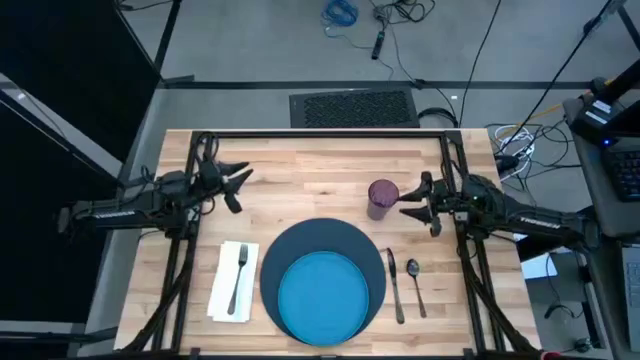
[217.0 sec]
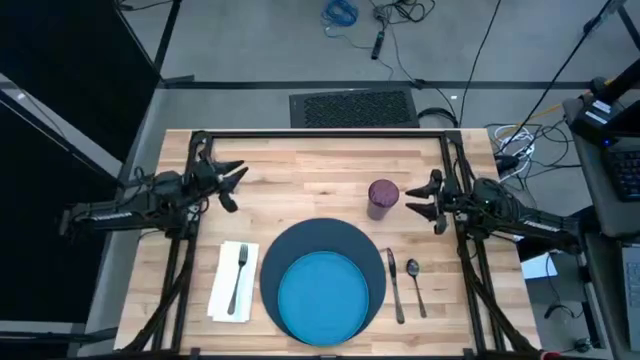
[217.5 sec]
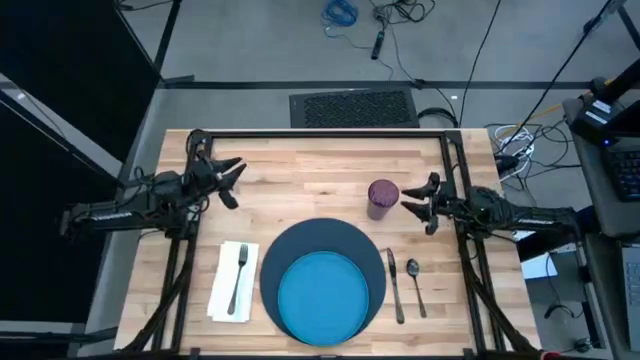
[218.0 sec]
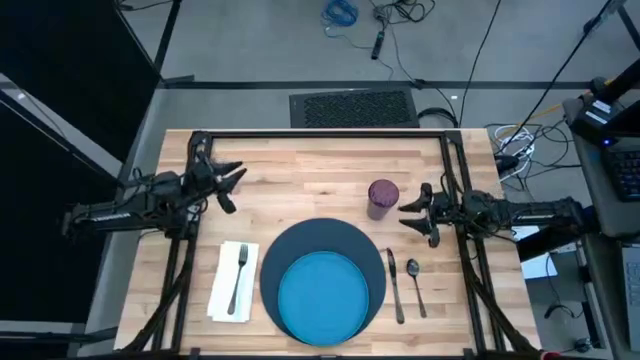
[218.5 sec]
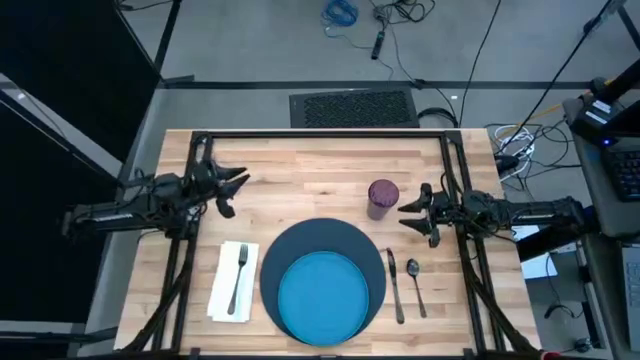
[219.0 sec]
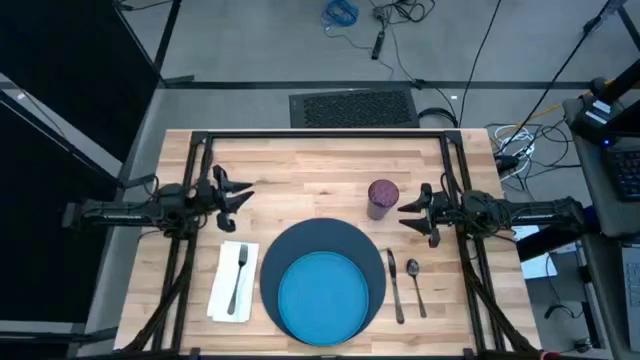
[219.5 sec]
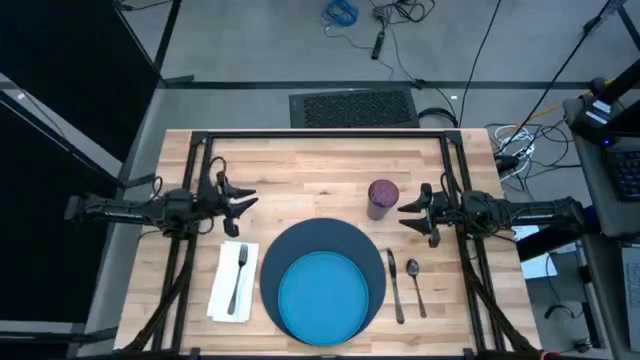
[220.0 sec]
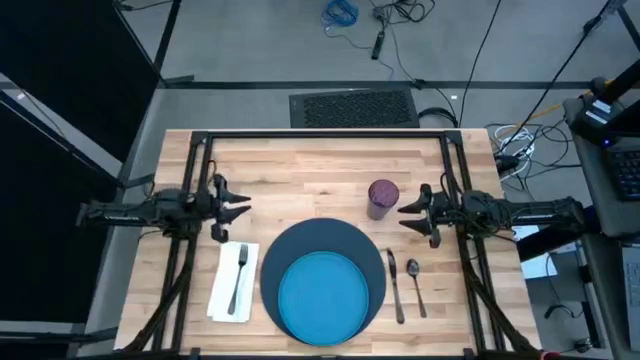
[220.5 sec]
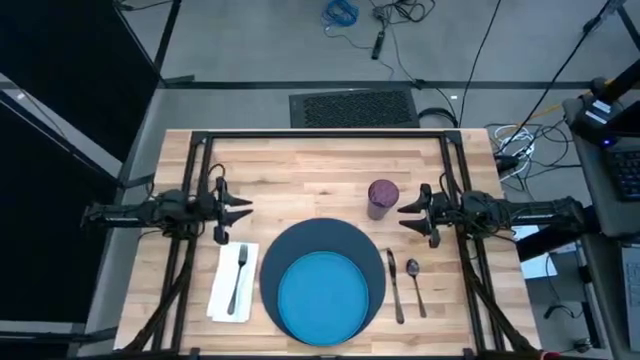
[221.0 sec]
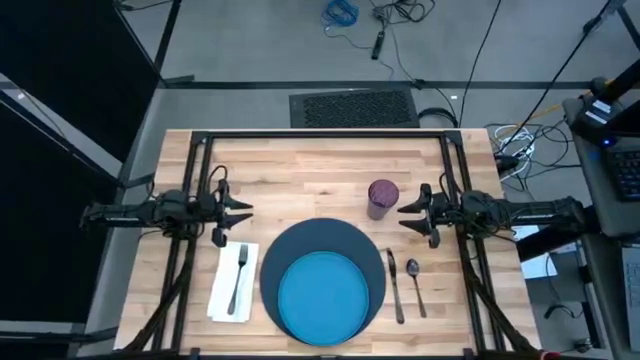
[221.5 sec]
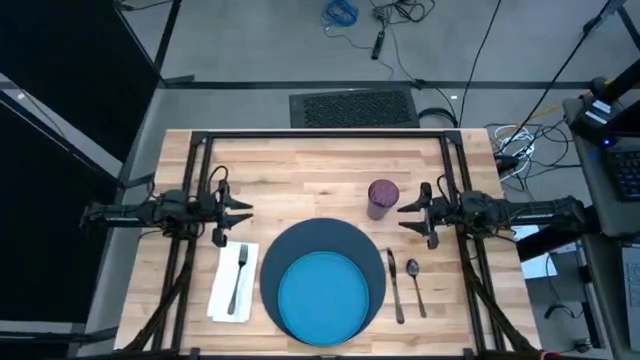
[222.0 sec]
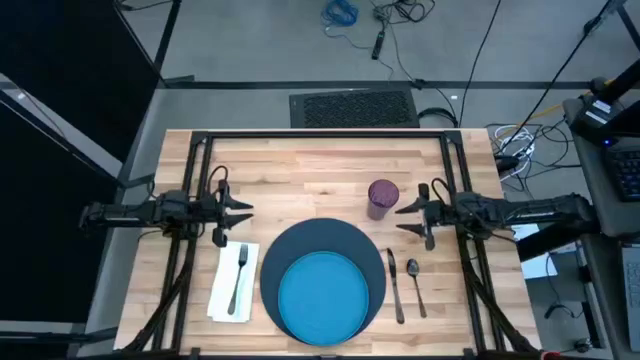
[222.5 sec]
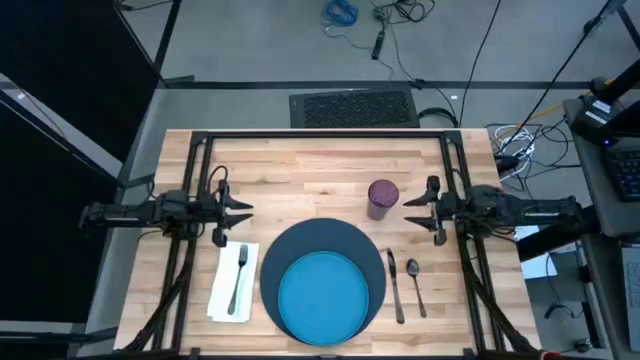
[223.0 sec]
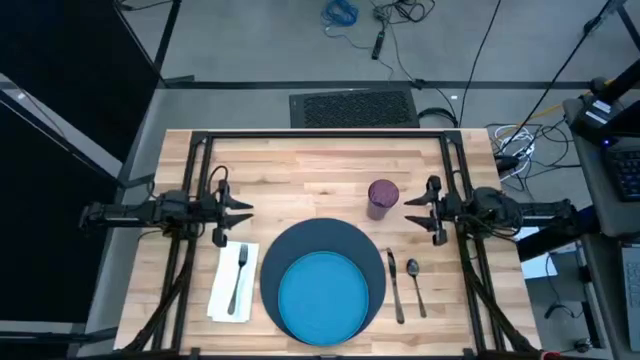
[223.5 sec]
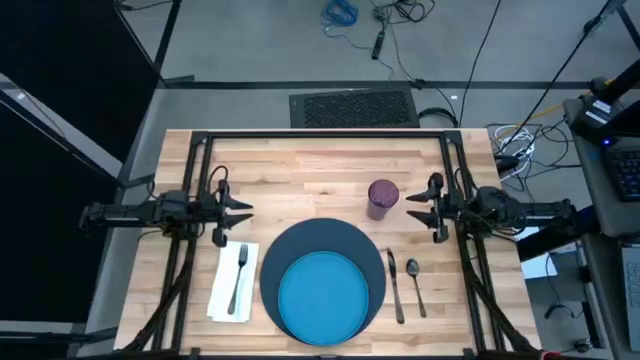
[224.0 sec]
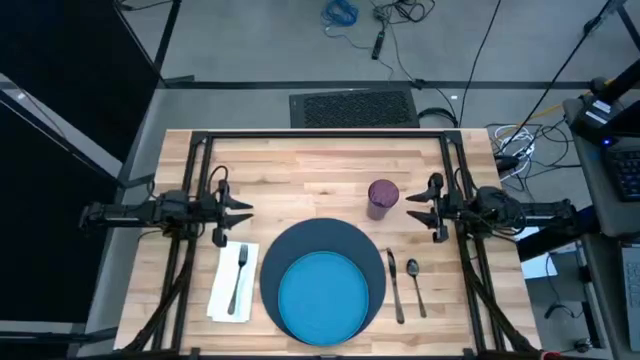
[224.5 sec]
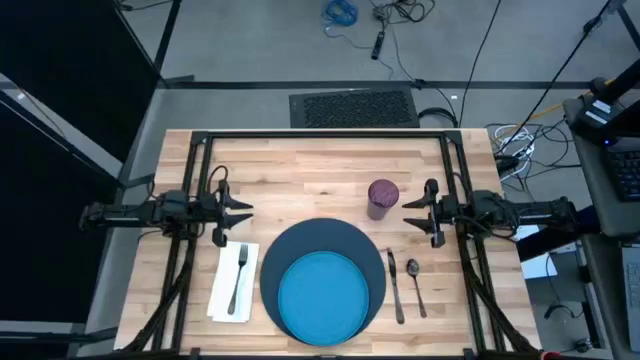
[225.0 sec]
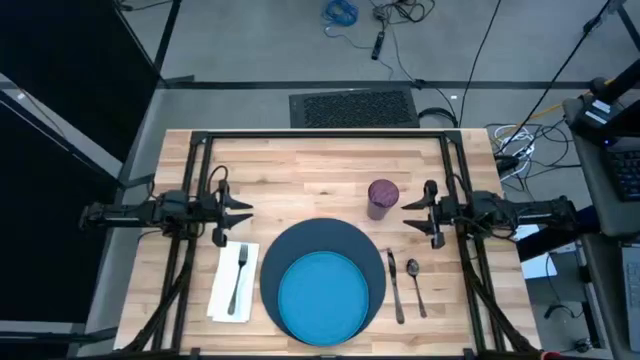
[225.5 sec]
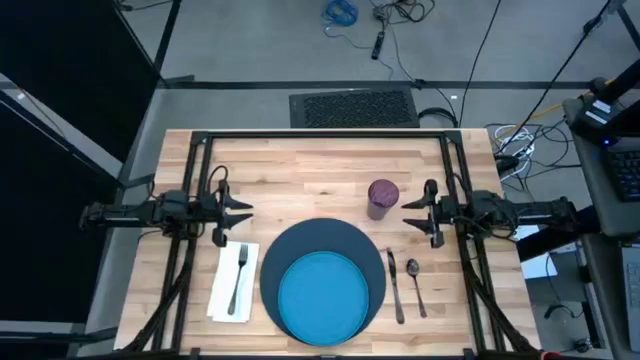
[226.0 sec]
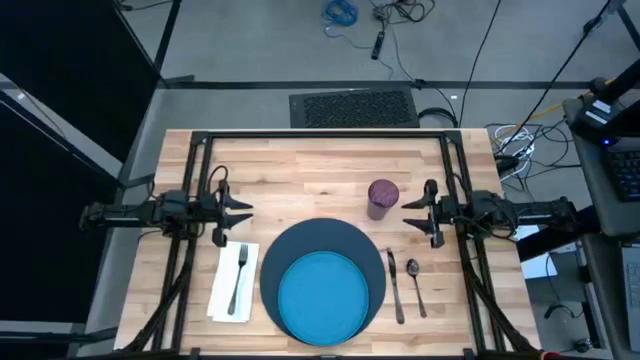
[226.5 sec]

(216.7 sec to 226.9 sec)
Task: Set table place
Return to Home Position

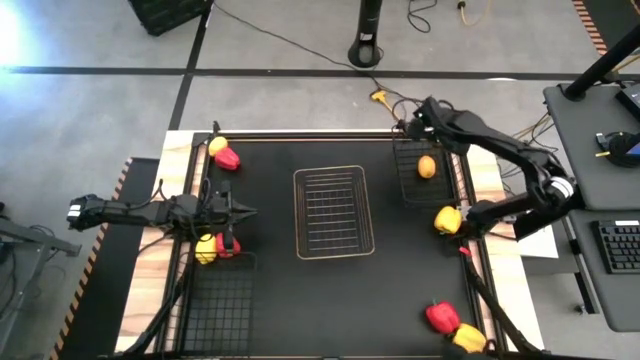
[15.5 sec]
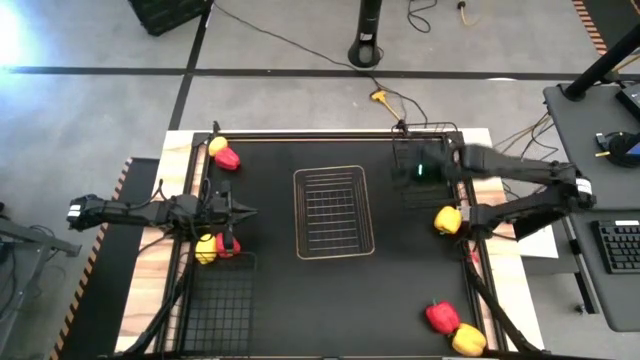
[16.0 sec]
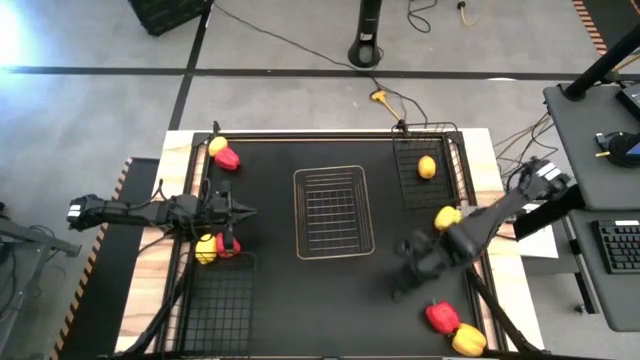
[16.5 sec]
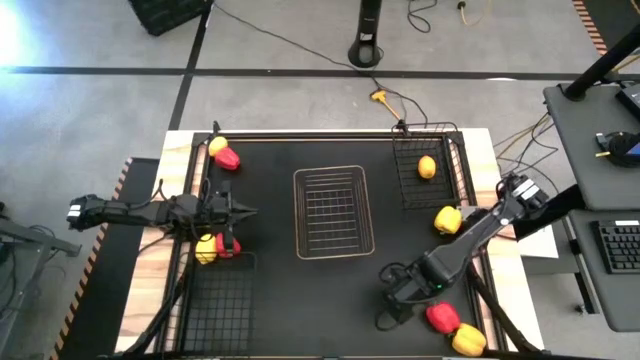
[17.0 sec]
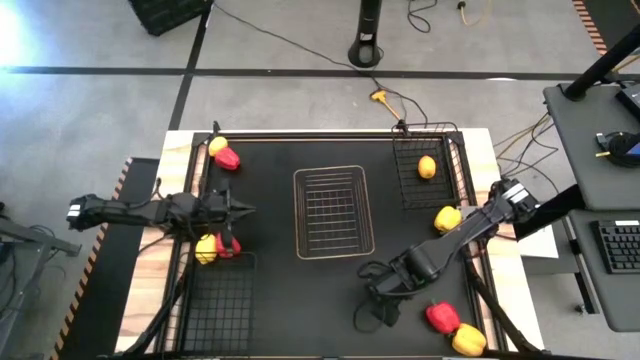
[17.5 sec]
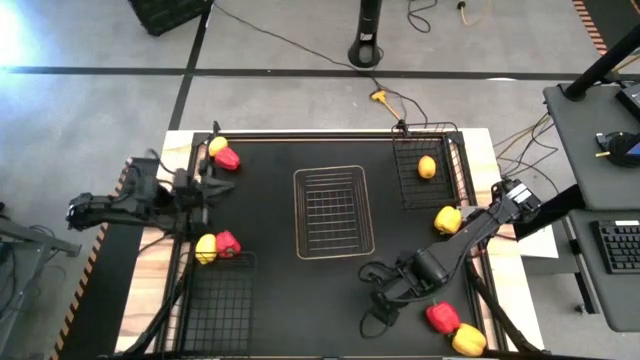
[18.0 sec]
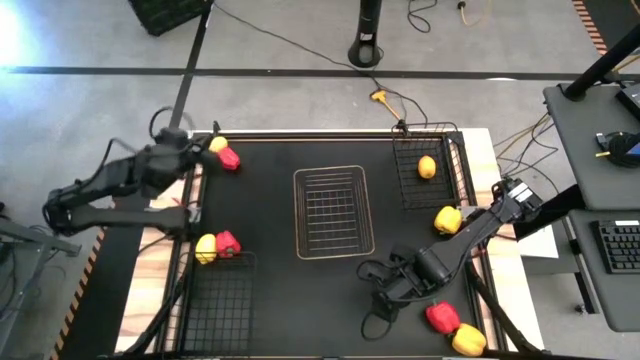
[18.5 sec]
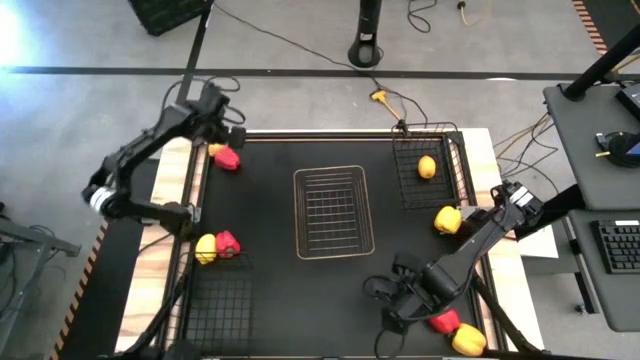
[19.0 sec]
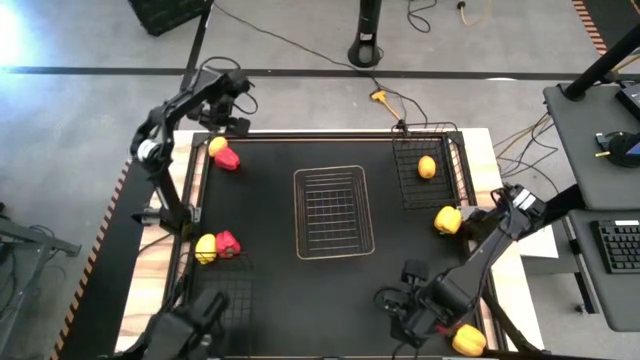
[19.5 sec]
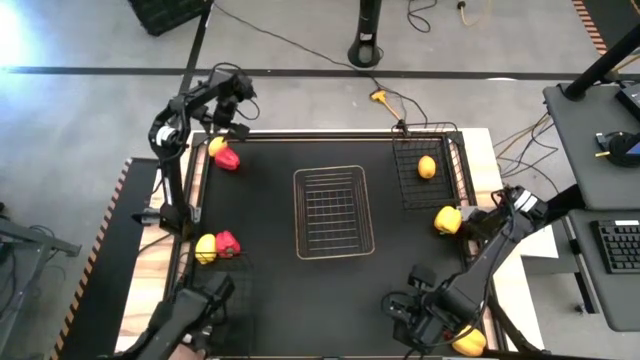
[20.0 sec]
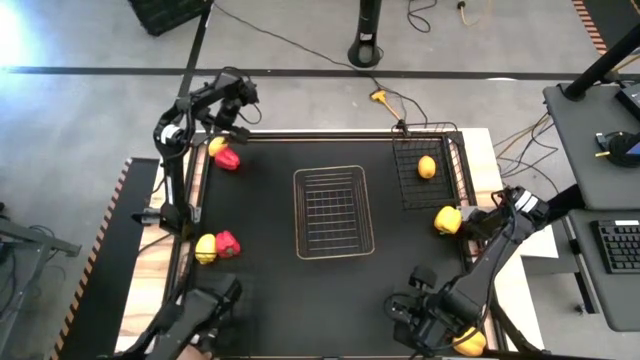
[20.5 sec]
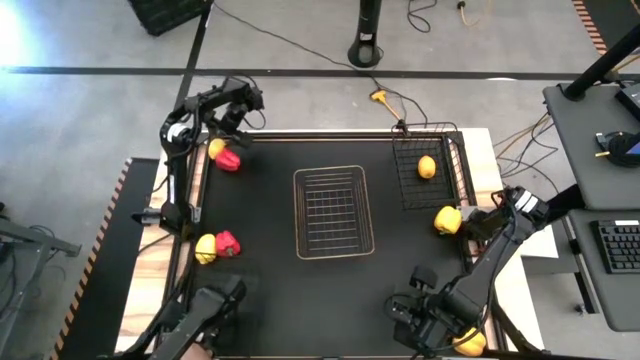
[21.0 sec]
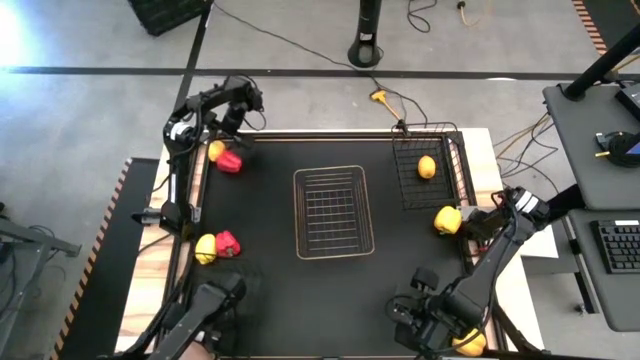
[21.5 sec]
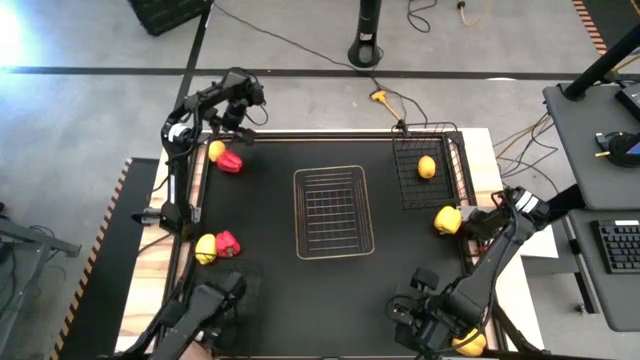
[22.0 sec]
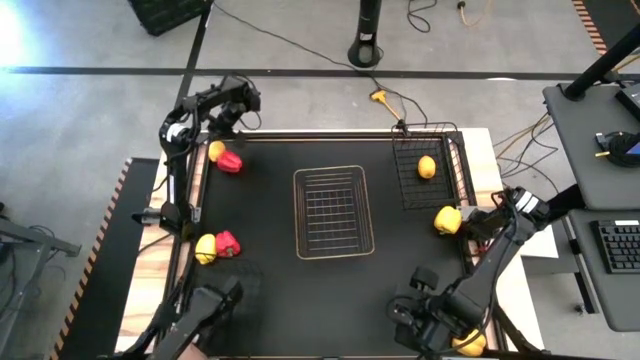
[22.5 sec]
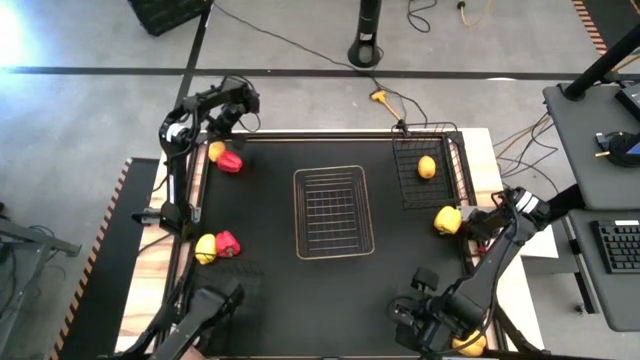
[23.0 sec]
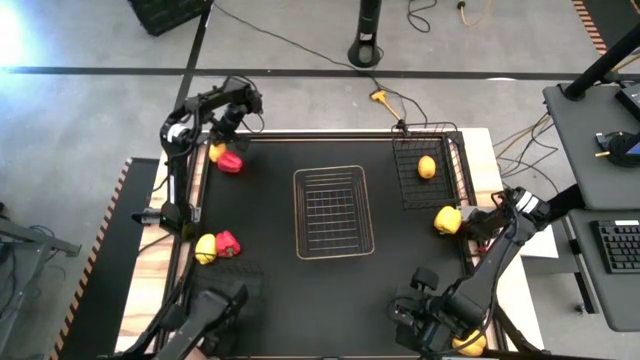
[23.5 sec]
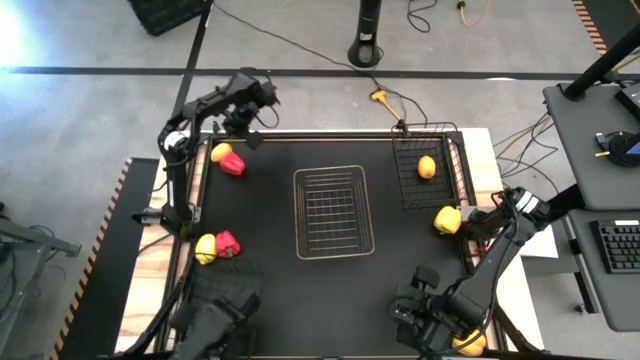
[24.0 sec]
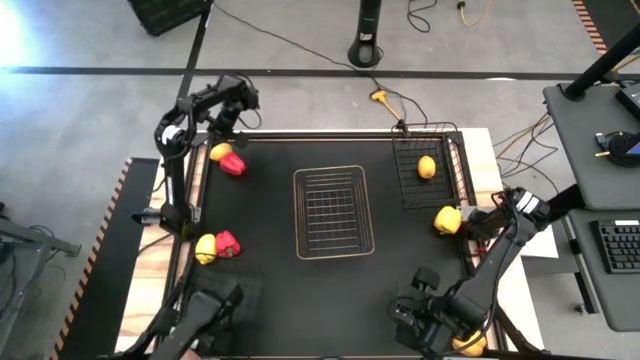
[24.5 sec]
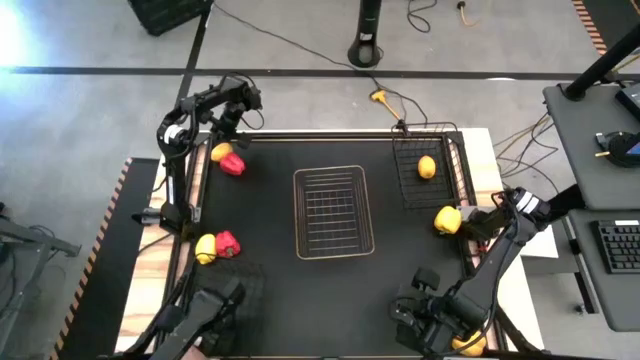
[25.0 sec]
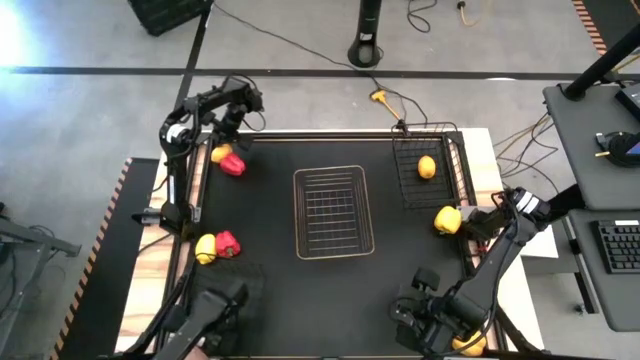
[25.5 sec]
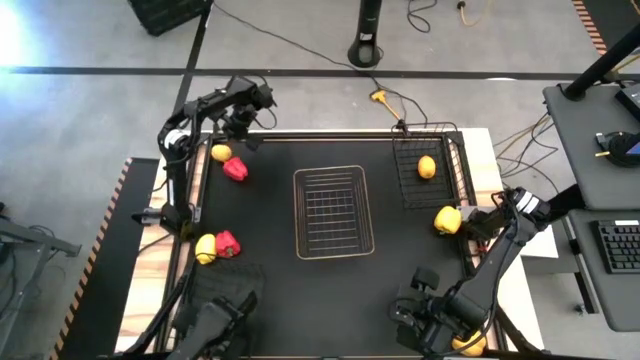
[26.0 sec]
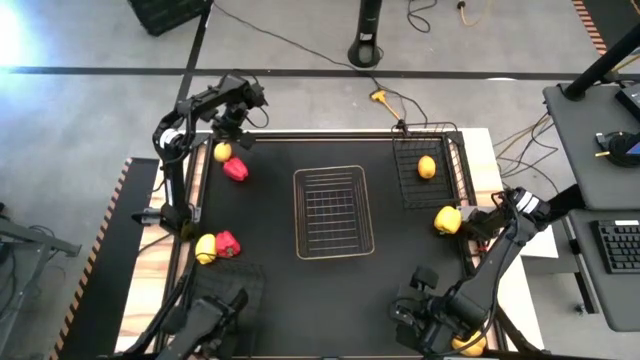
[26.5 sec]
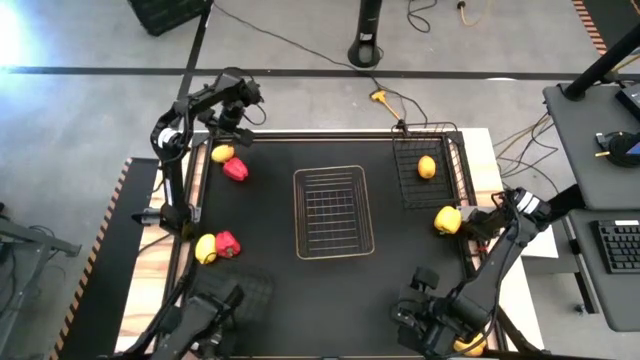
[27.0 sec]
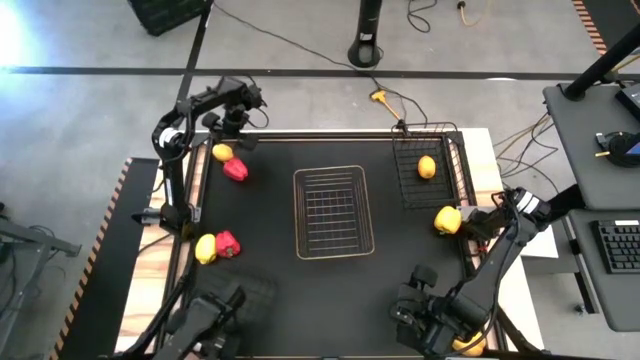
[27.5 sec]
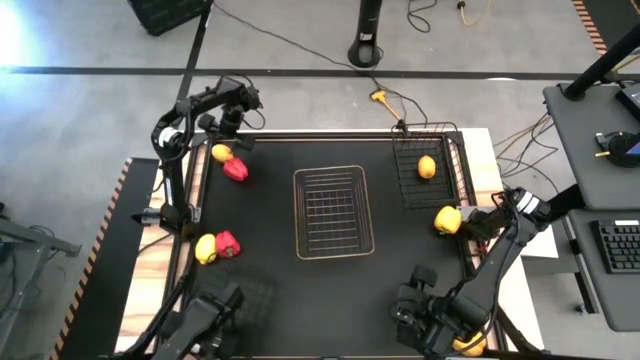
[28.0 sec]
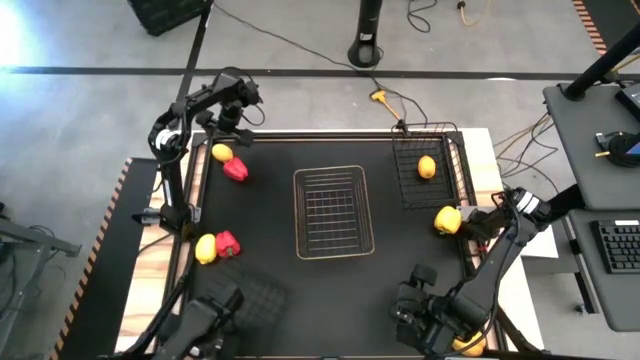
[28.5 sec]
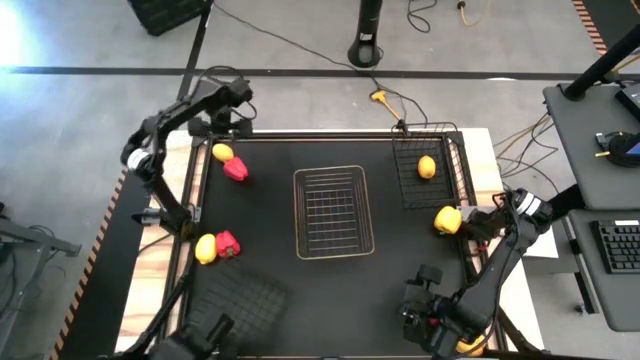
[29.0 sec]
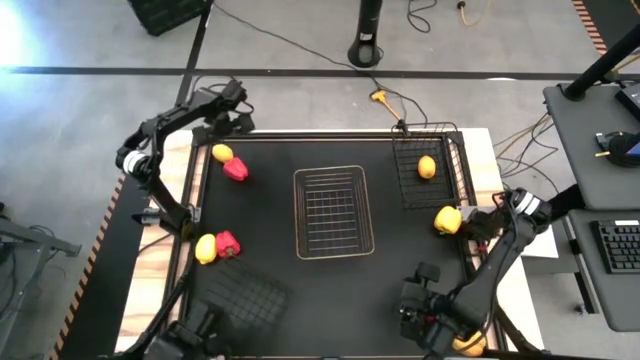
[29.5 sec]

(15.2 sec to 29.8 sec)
Task: Sort produce into baskets
Put the top lemon into the top black wire basket
